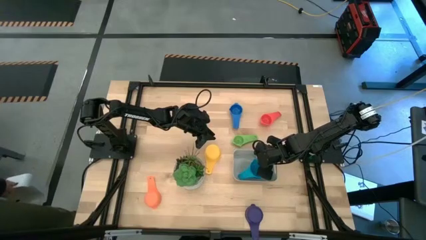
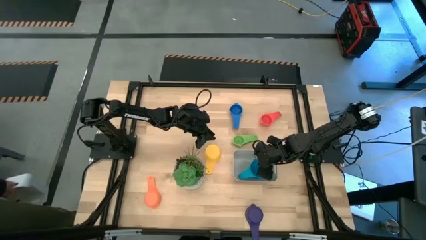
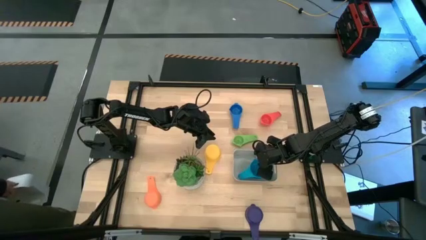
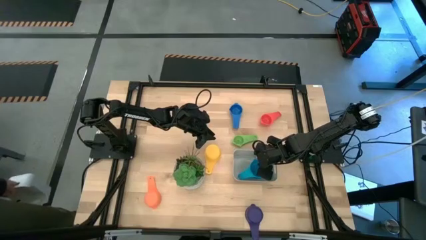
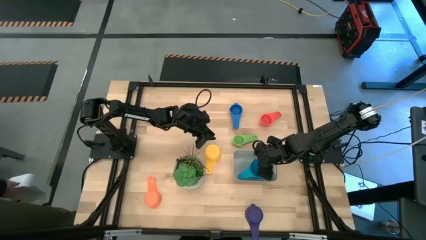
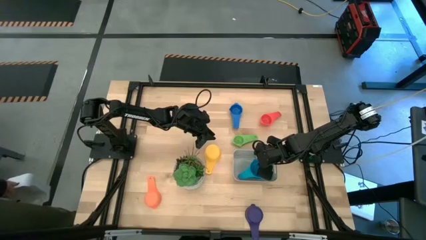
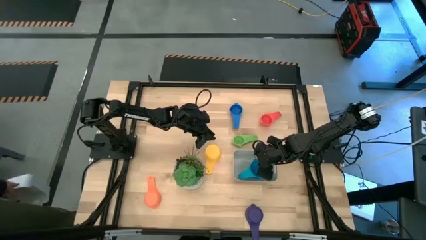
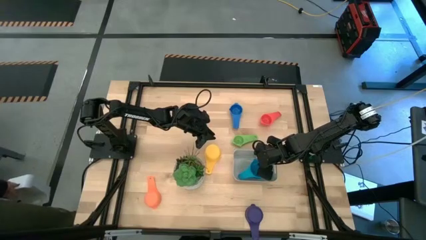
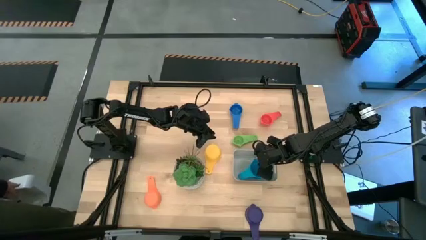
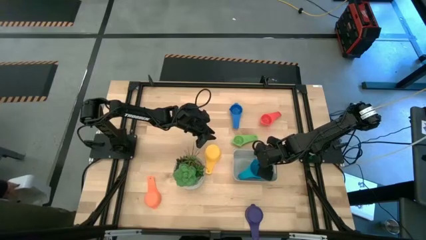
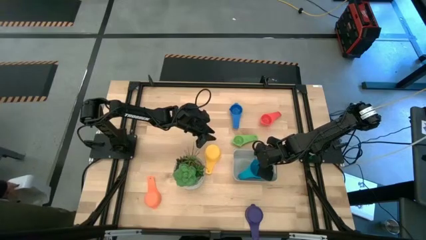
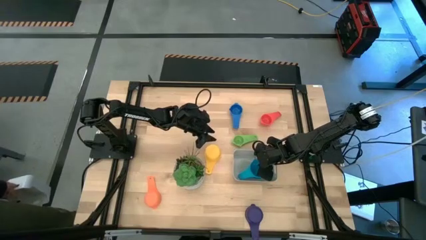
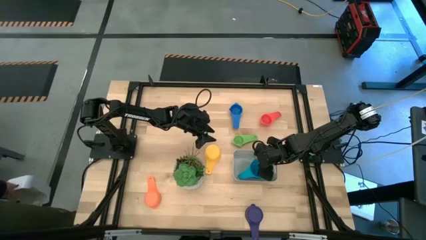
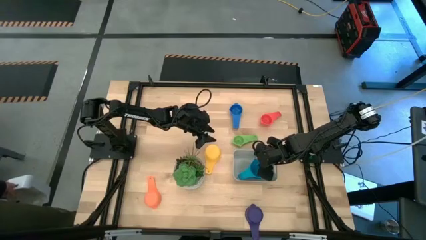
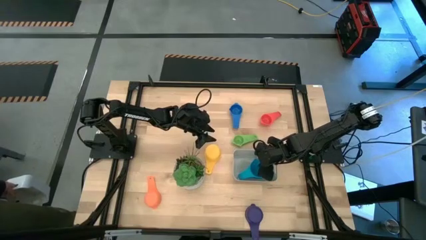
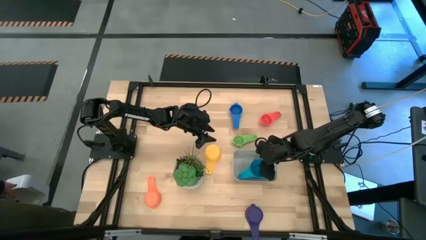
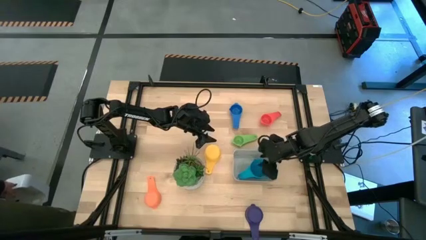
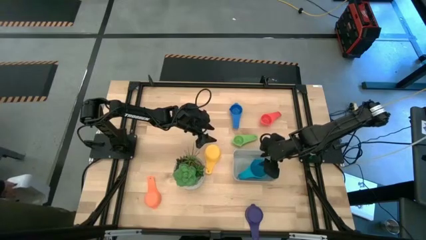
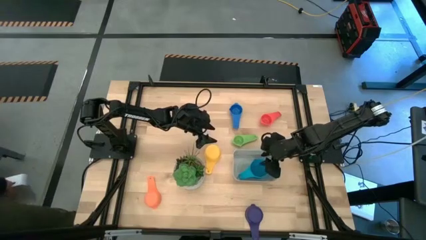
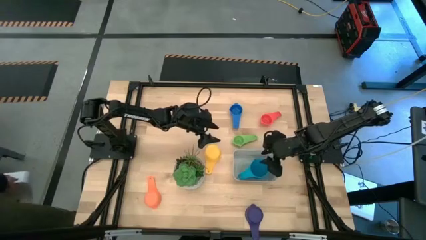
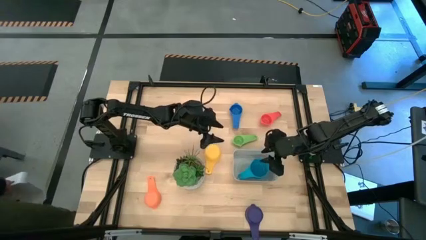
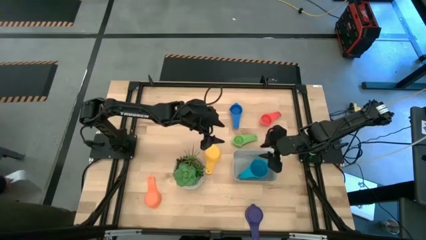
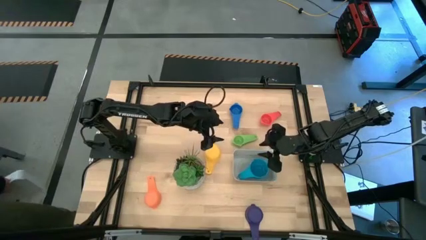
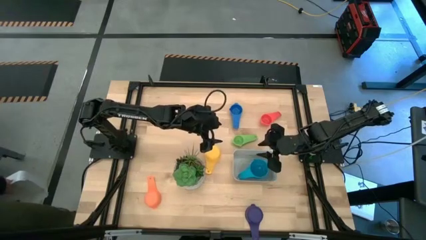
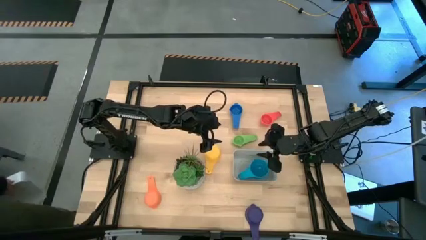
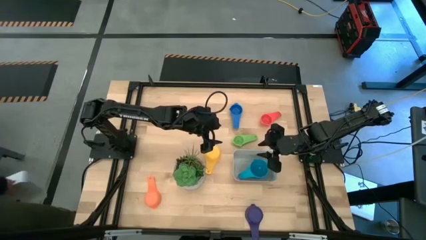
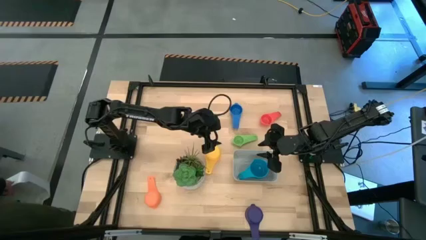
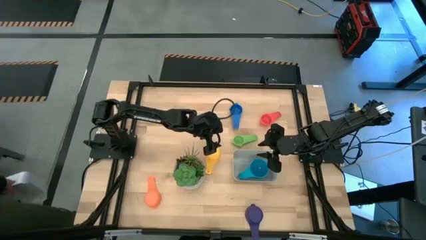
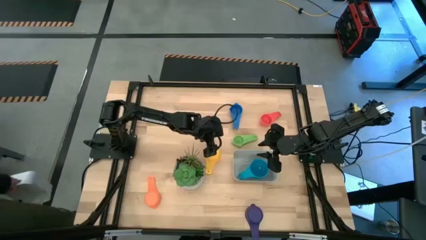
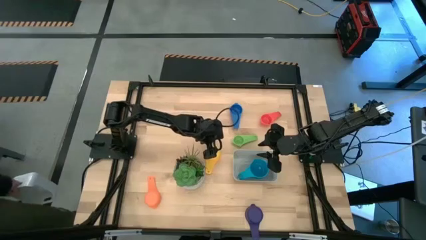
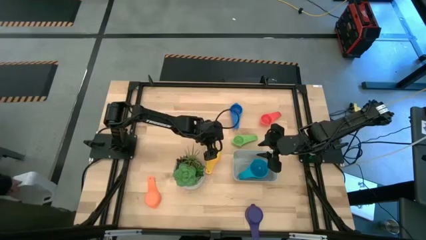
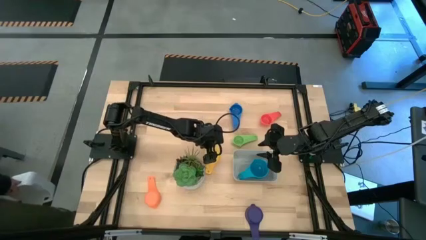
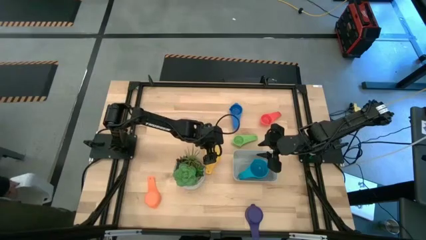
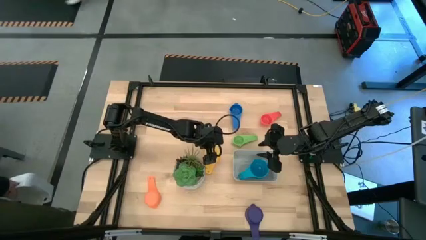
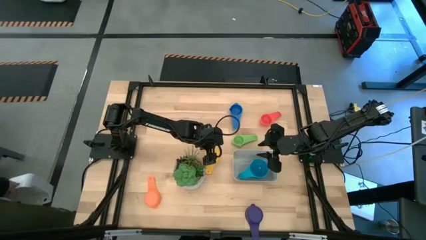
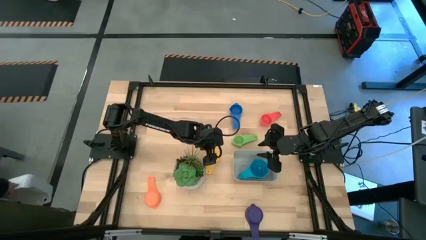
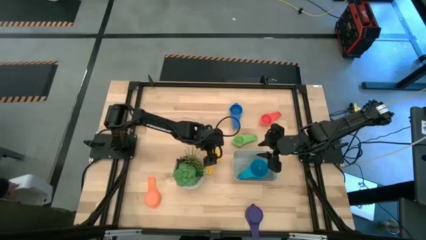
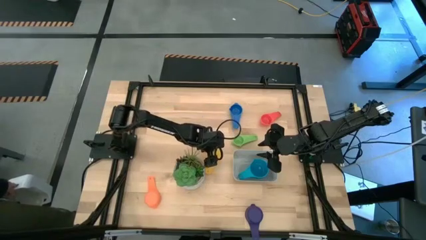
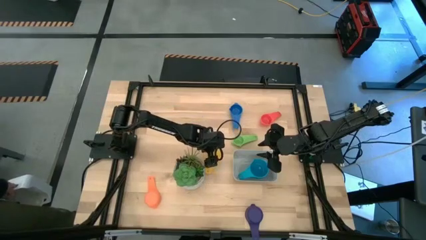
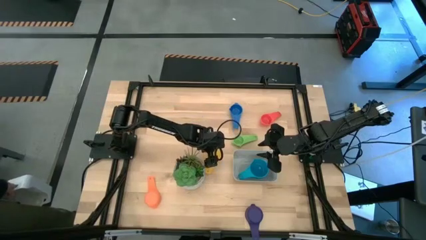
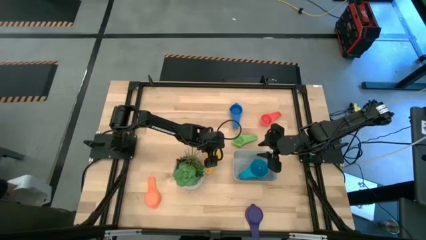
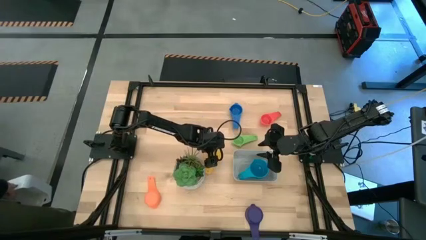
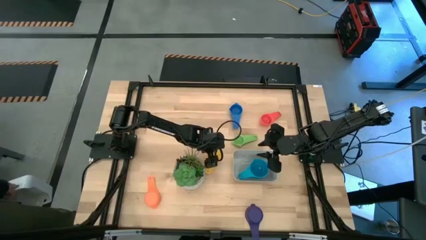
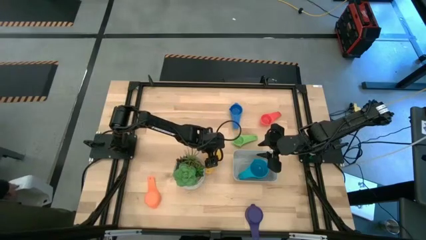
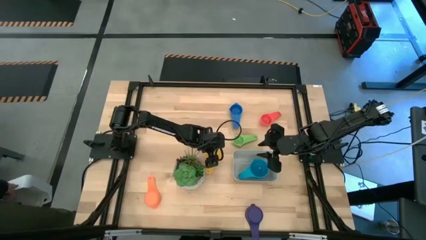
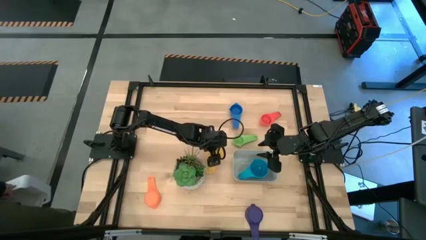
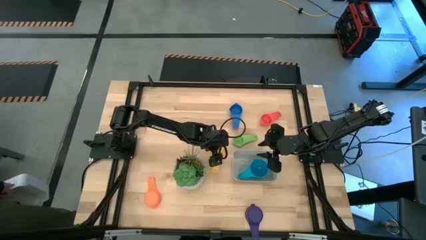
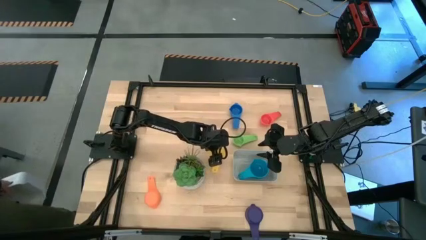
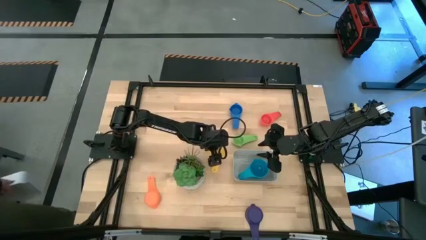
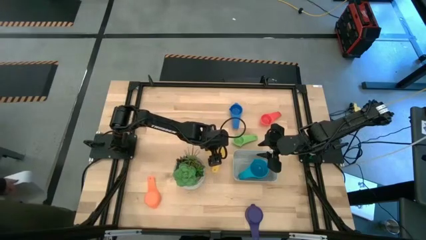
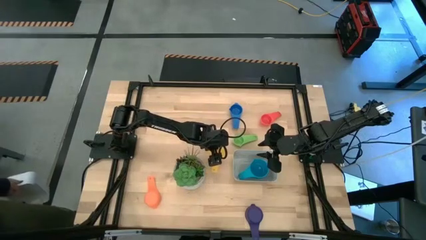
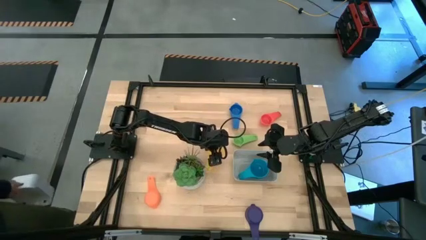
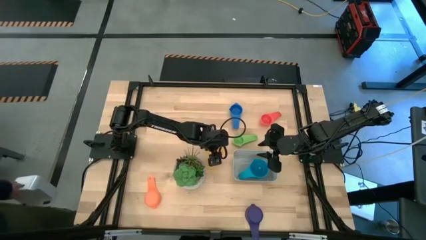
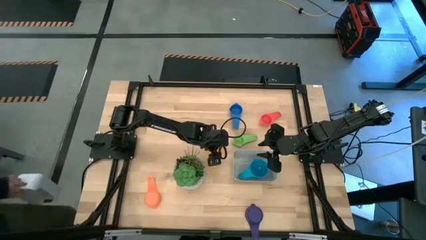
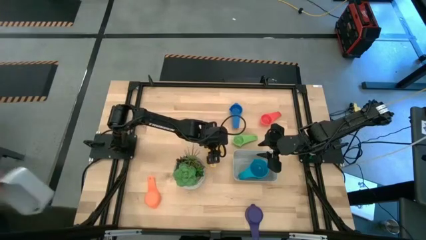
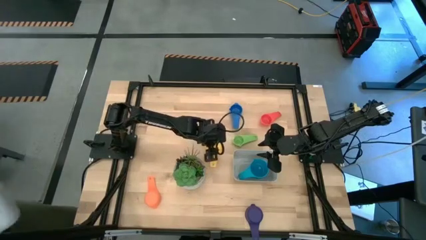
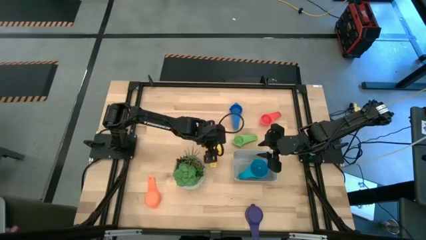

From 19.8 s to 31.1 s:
Task: Nest measuring cups in basket
Stack the yellow measuring cup on top of the blue measuring cup in the grey bin
